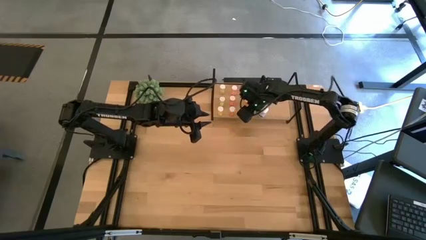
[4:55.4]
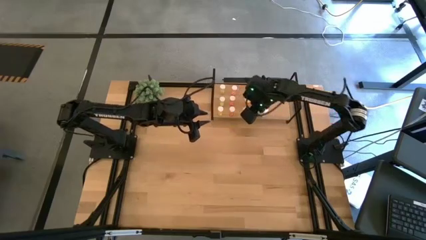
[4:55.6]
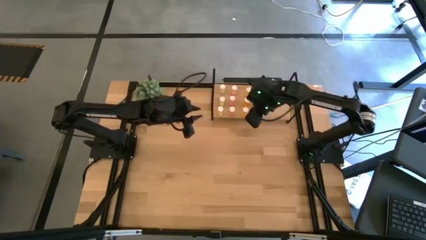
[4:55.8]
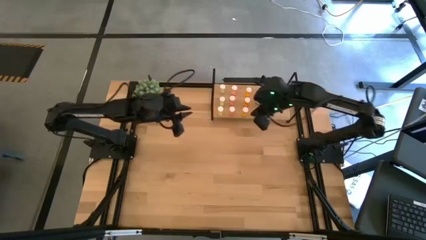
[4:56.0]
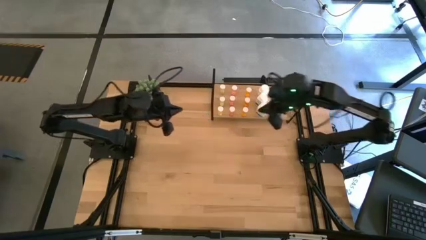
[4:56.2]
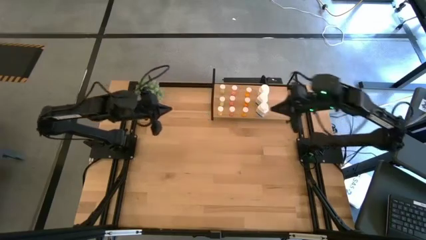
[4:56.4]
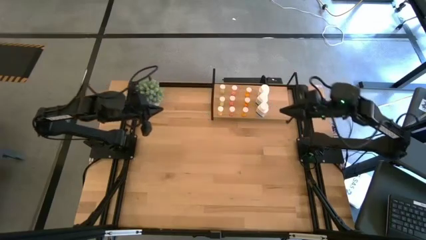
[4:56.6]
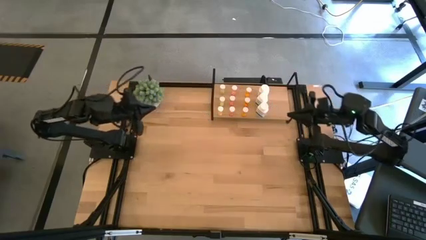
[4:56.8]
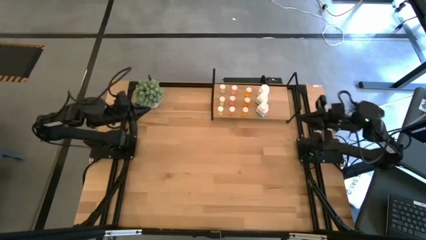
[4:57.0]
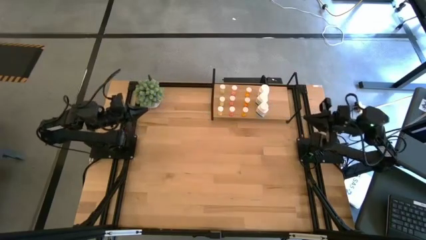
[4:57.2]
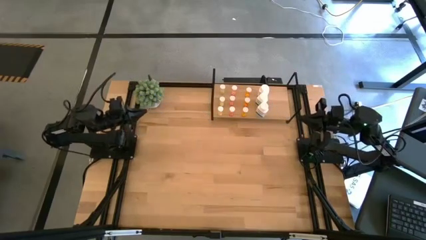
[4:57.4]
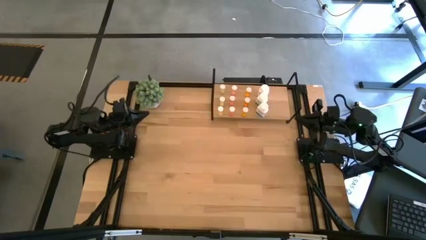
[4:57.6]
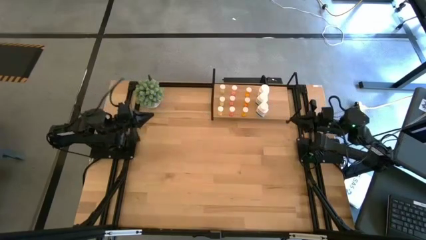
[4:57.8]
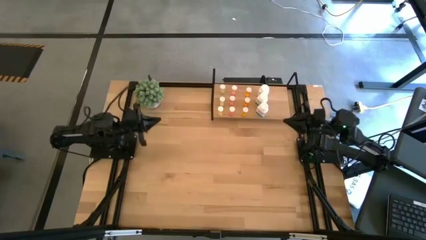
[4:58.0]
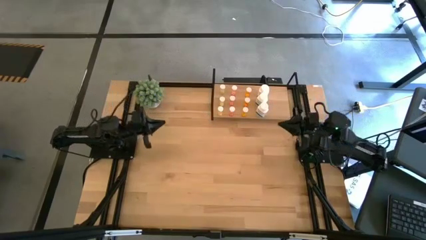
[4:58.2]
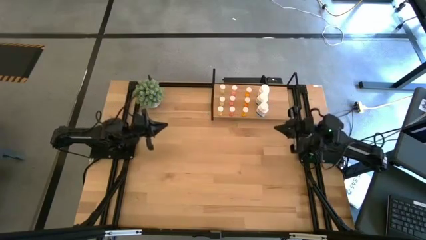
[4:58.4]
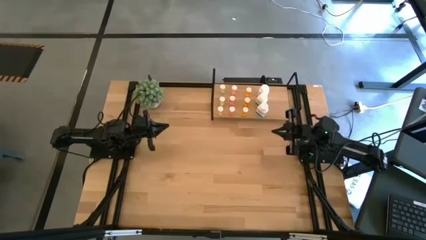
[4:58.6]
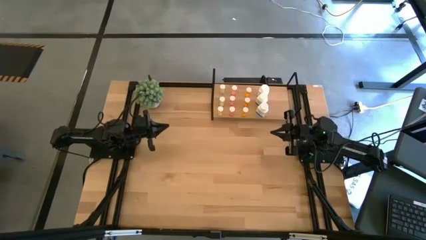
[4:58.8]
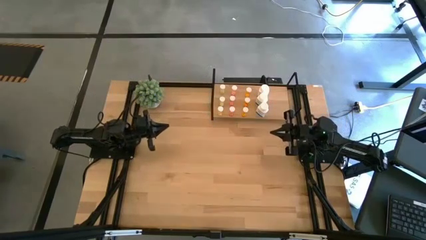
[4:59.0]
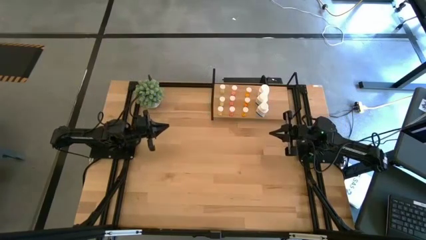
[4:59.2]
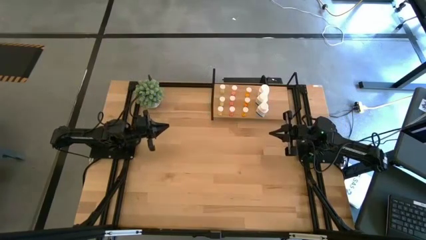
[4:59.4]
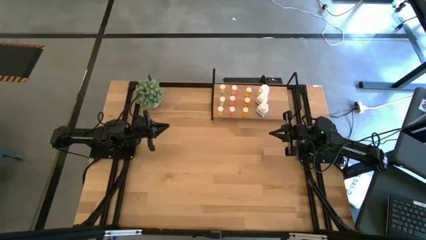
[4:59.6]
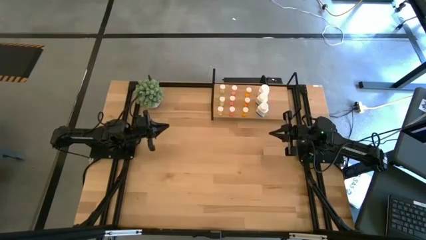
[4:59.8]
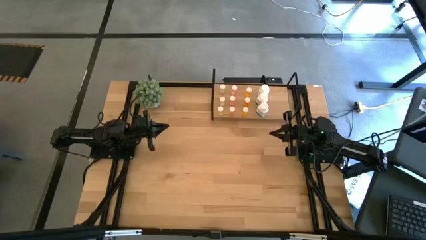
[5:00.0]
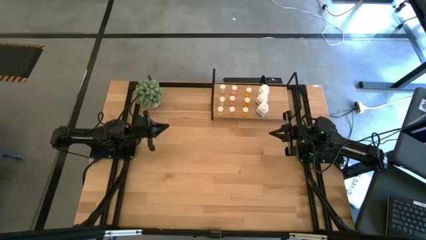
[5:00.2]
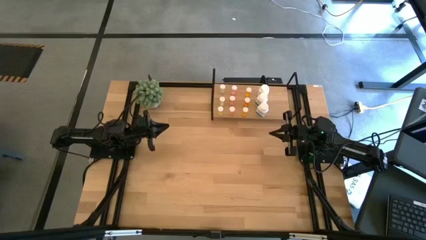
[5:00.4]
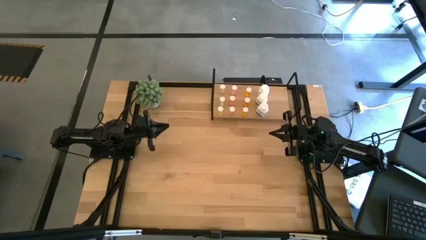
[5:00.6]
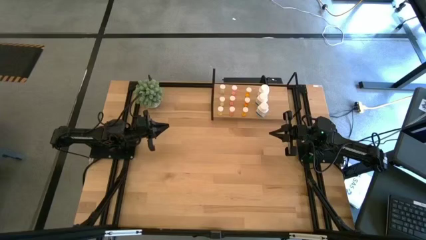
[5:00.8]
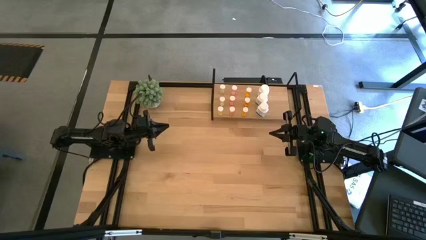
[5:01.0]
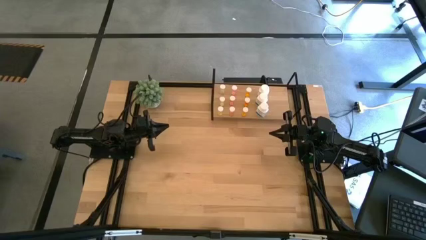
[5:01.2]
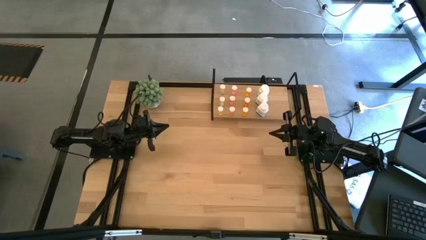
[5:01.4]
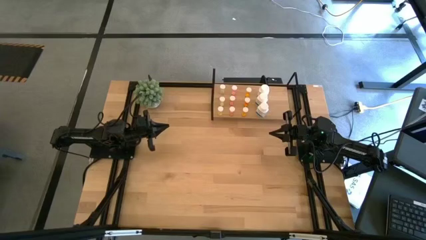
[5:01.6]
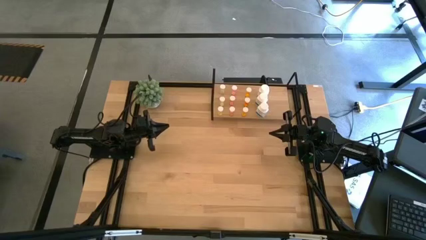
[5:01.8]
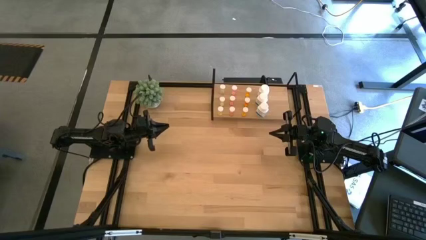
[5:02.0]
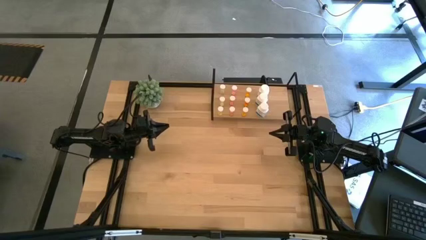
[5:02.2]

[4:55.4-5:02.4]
Task: Pick and place medicine bottles onto shelf by color
Return to Home Position

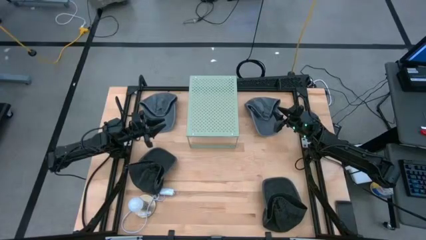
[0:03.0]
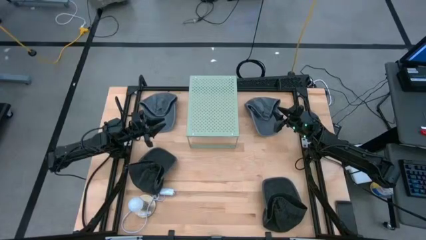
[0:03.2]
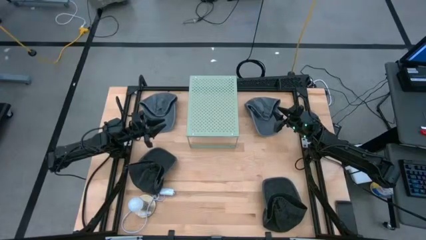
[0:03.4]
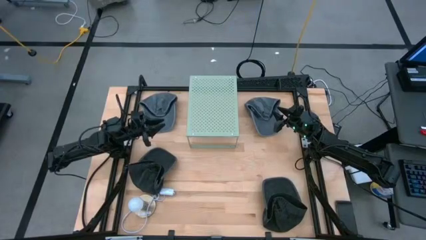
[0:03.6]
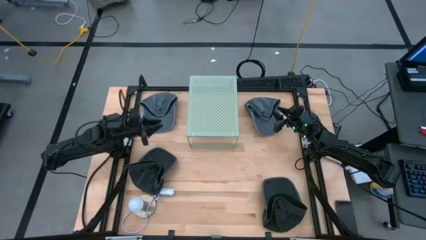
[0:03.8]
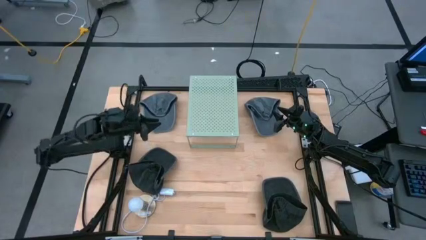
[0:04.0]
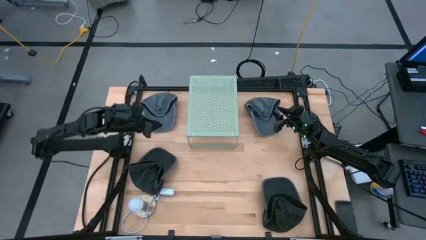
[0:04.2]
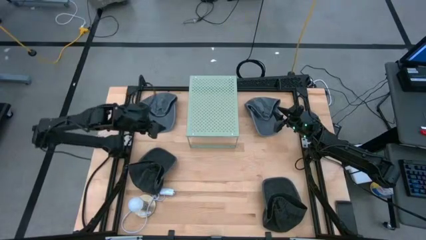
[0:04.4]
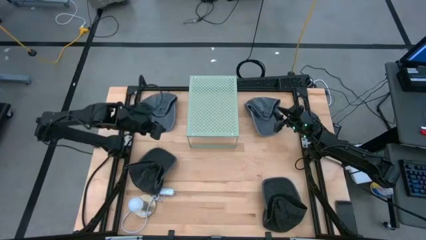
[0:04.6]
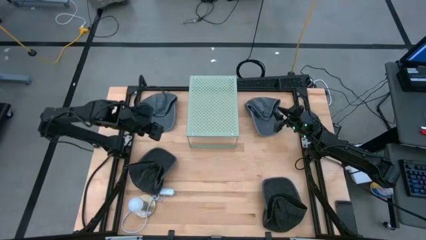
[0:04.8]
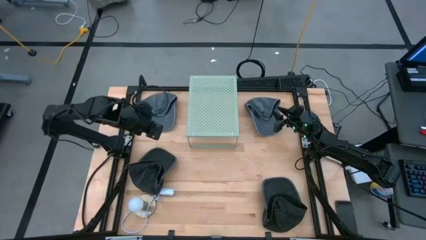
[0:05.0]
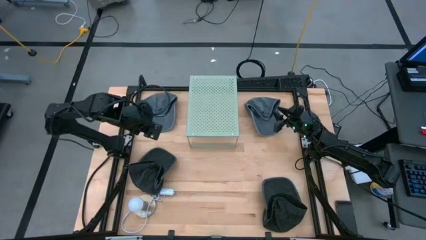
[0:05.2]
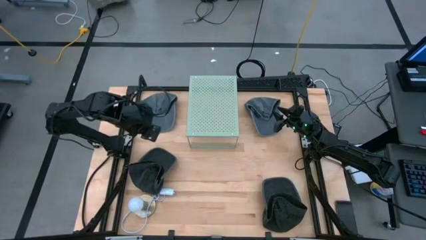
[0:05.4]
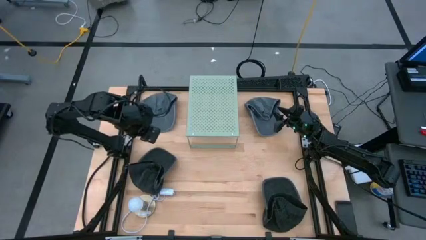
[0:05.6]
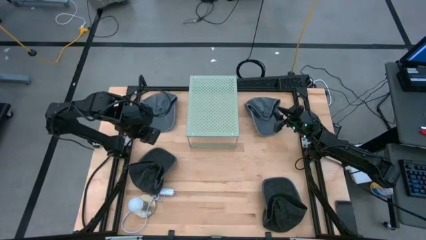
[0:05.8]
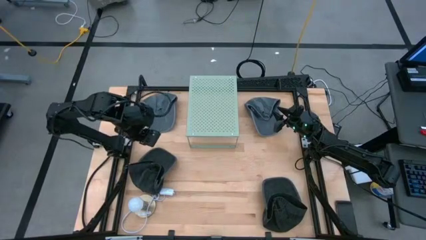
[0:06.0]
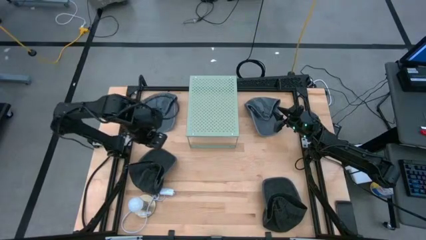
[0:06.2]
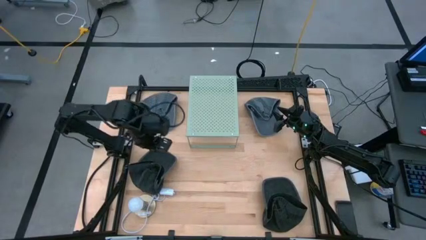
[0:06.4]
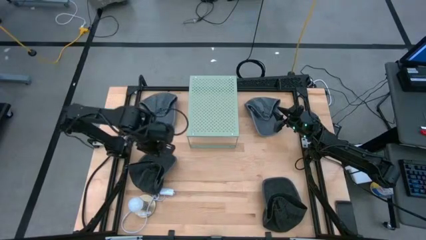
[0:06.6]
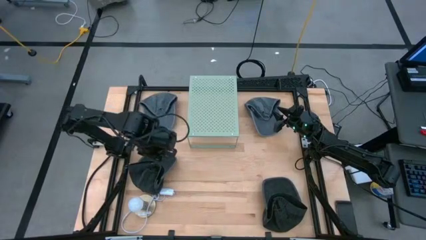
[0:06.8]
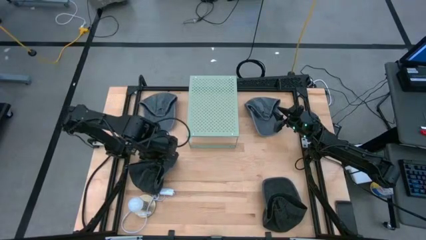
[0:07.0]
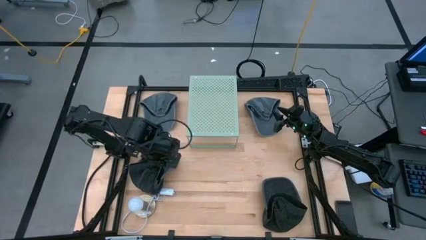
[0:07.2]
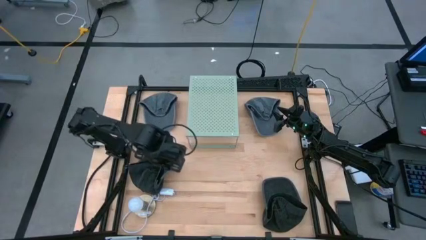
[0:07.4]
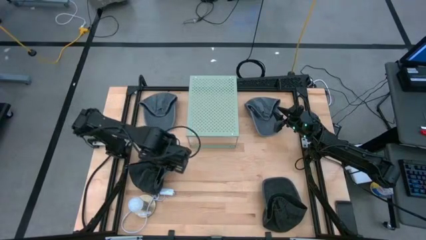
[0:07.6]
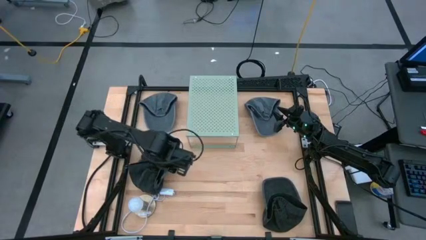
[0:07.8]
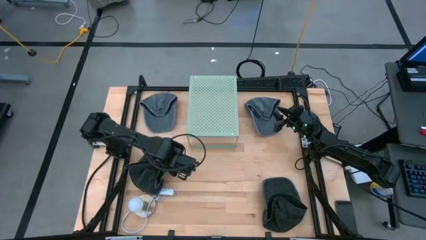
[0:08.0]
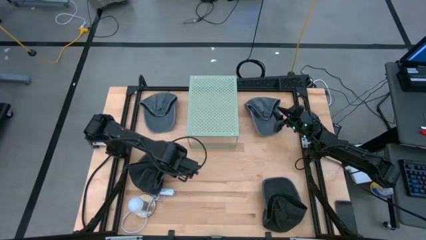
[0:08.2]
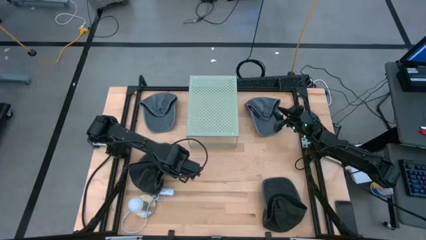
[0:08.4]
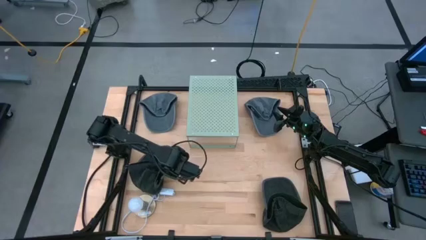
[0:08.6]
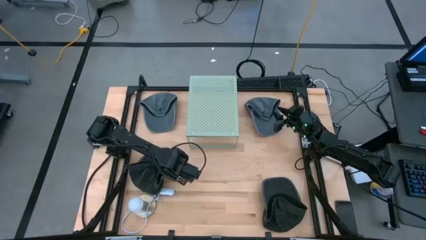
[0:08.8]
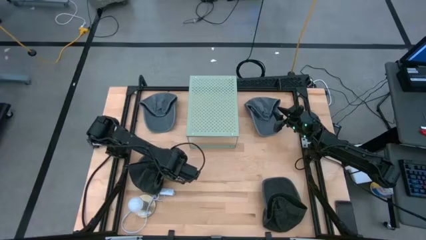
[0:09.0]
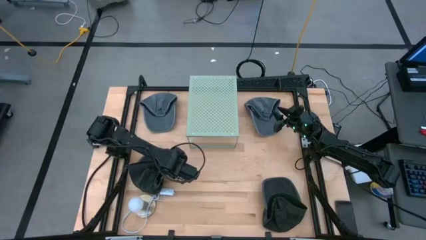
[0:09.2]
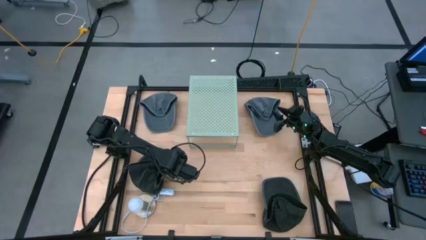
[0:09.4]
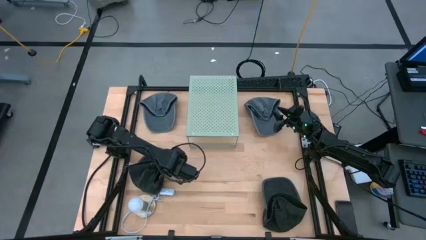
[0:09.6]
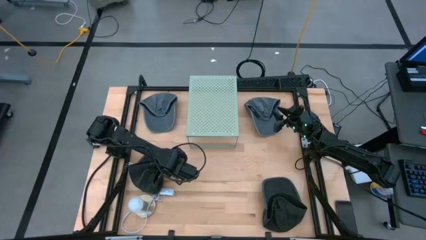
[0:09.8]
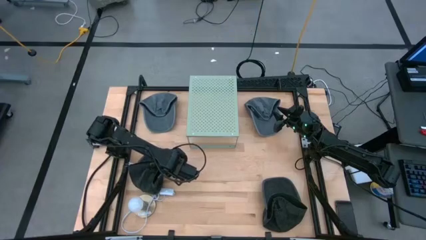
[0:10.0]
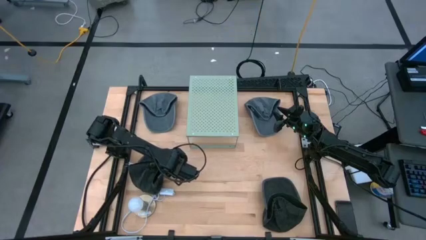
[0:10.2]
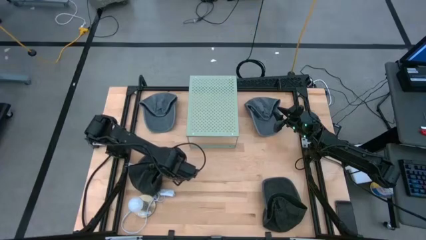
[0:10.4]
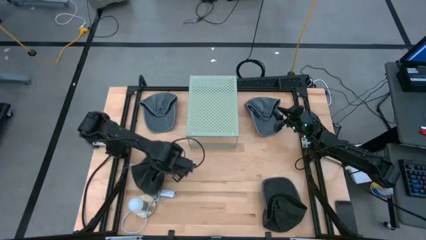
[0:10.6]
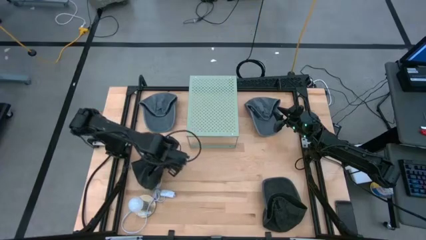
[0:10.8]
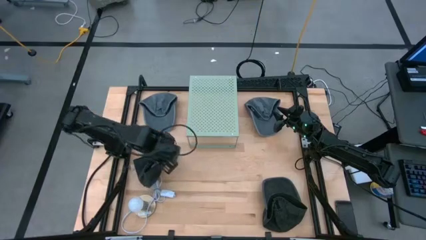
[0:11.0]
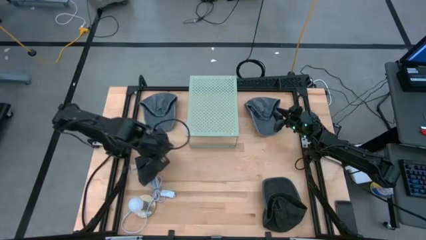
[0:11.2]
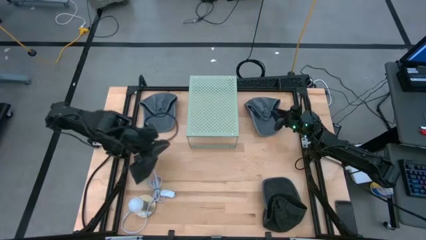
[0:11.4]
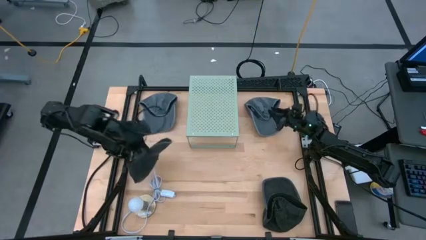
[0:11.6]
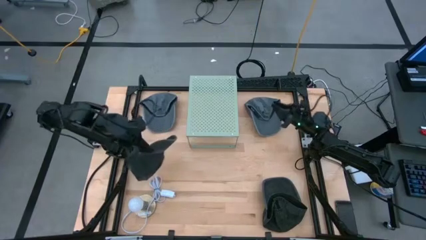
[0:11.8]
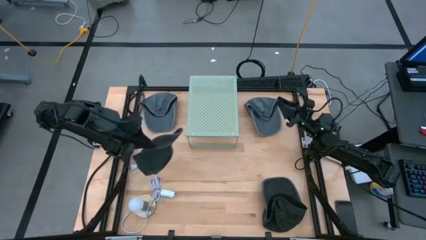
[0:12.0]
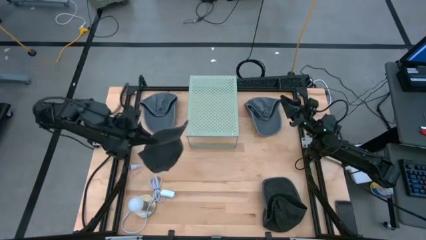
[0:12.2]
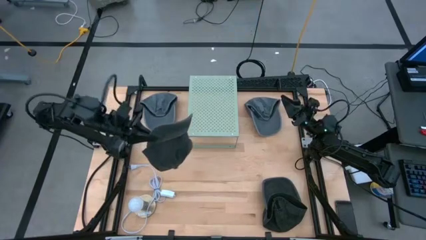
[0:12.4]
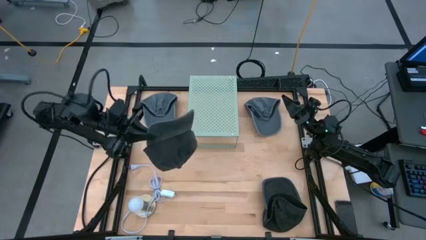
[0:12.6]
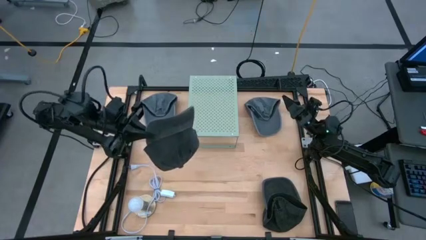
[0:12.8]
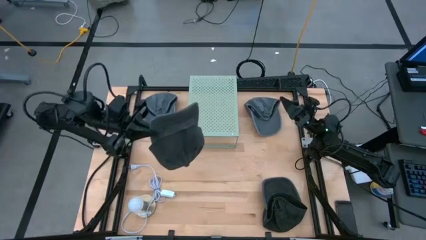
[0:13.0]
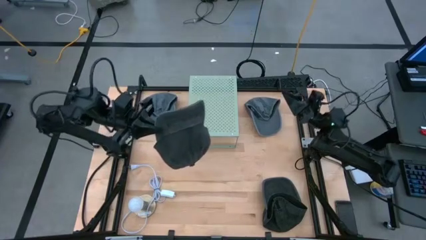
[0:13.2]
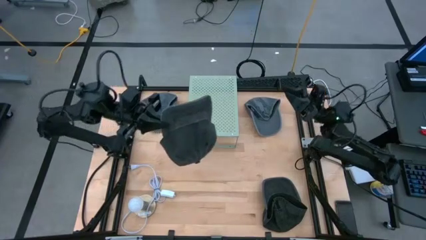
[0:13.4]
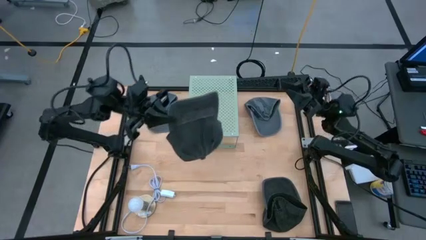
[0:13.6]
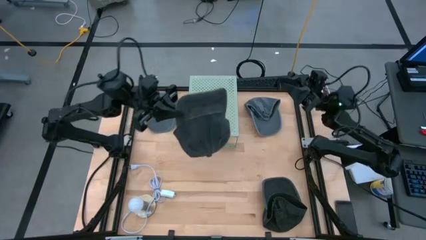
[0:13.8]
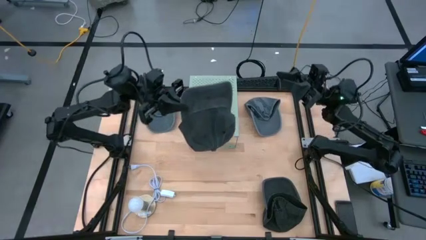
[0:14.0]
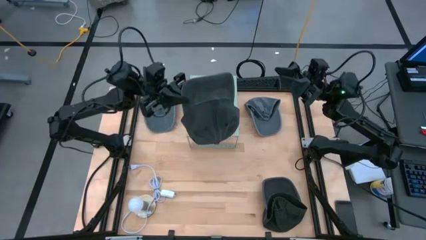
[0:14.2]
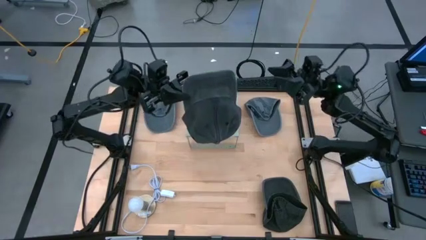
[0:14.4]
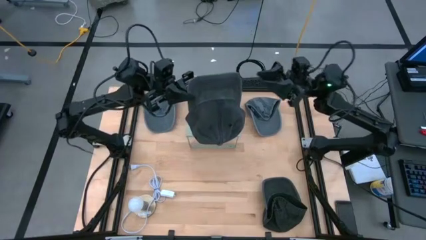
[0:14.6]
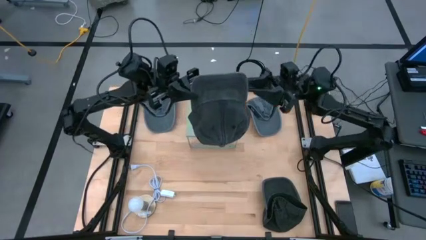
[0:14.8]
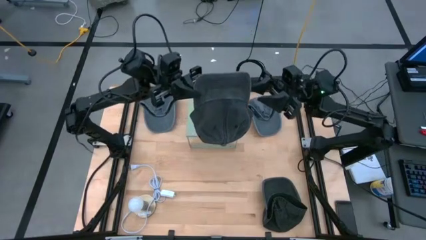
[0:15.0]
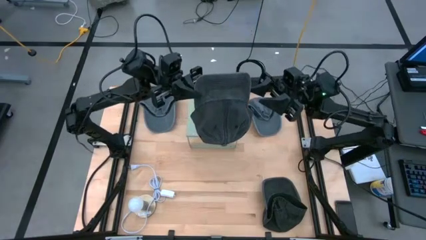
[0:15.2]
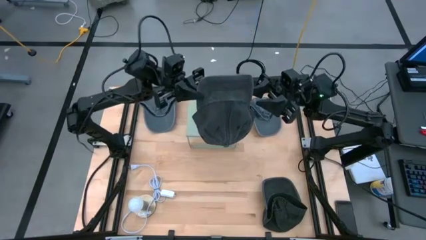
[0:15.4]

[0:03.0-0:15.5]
Task: Pick & Place hat
Put the left black cap on the shelf
